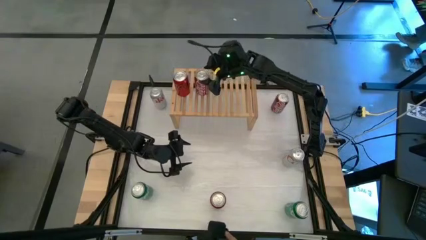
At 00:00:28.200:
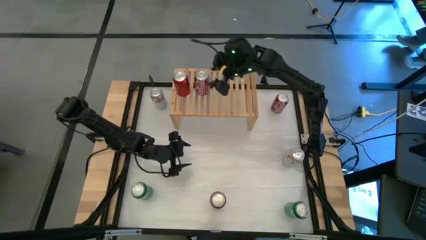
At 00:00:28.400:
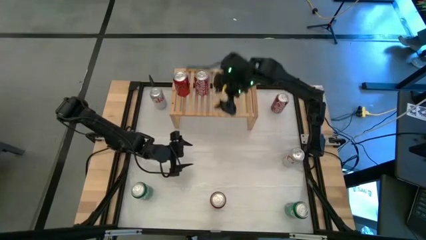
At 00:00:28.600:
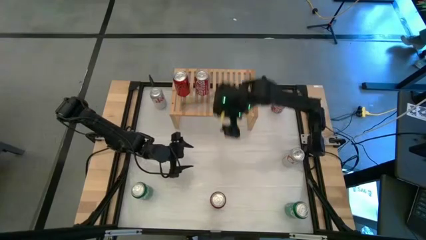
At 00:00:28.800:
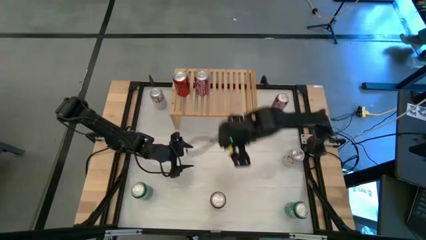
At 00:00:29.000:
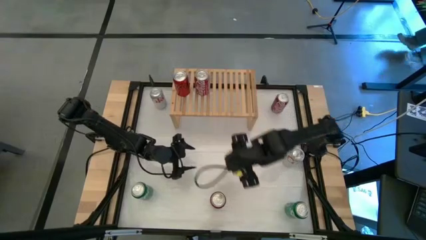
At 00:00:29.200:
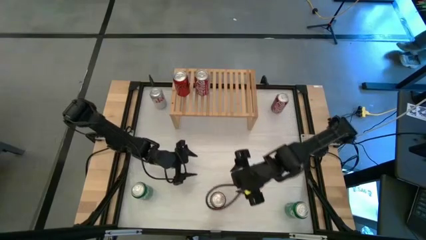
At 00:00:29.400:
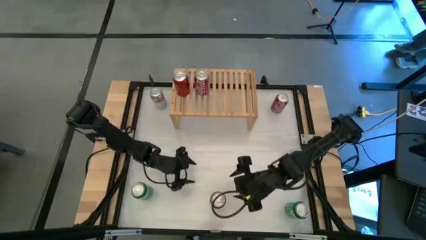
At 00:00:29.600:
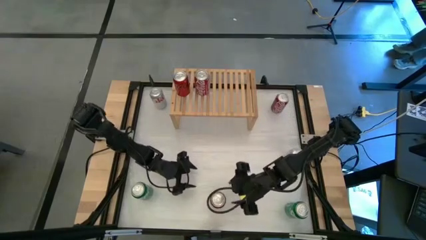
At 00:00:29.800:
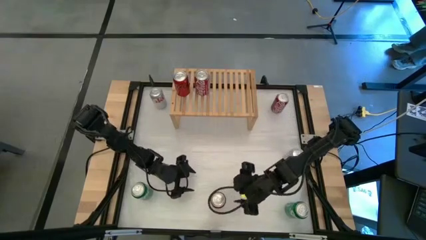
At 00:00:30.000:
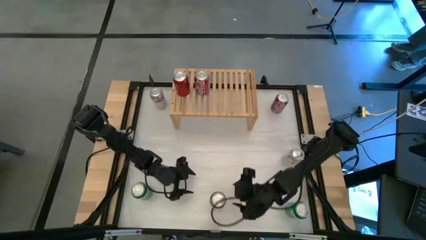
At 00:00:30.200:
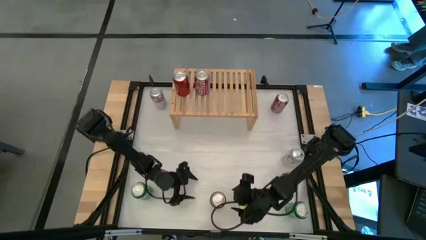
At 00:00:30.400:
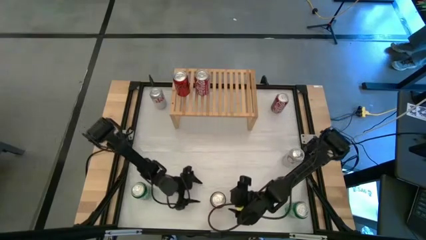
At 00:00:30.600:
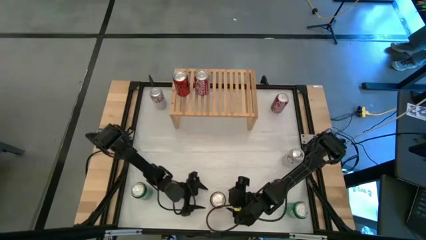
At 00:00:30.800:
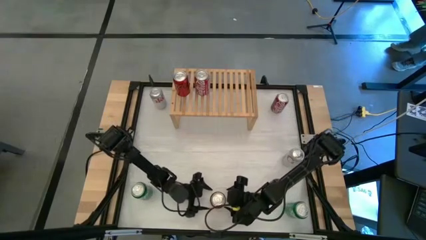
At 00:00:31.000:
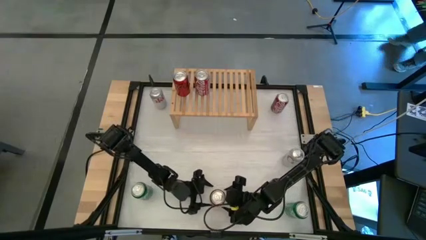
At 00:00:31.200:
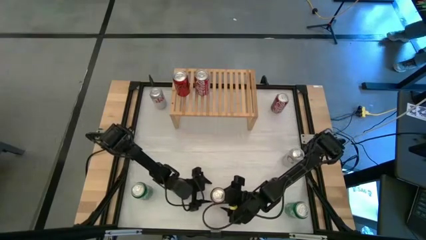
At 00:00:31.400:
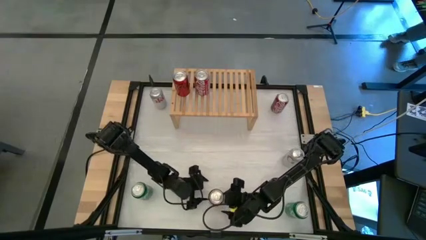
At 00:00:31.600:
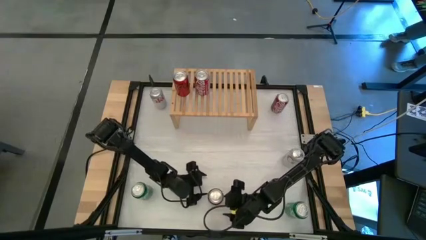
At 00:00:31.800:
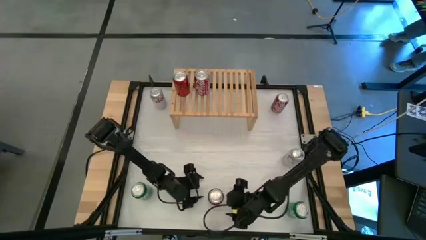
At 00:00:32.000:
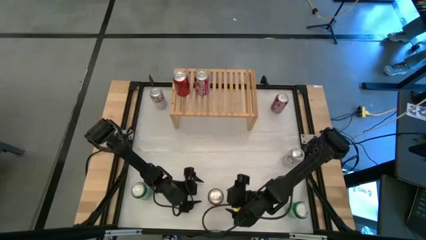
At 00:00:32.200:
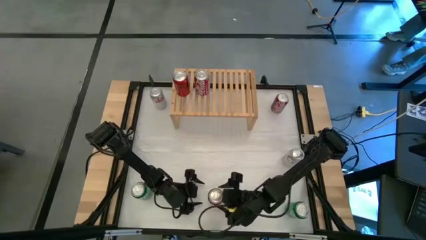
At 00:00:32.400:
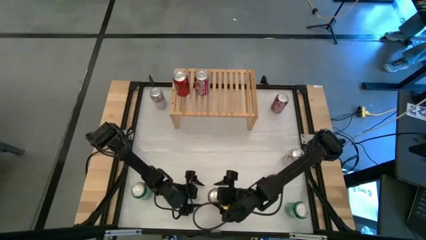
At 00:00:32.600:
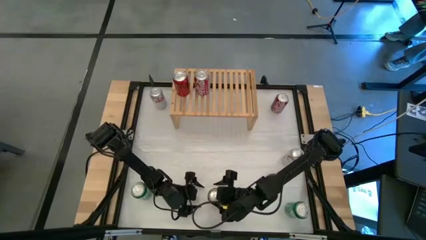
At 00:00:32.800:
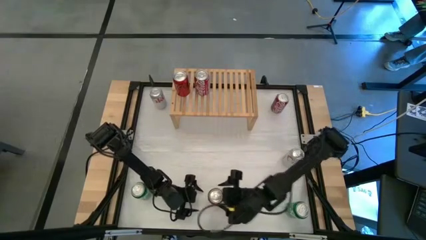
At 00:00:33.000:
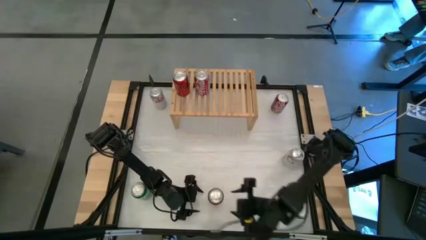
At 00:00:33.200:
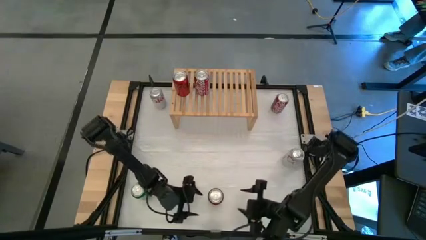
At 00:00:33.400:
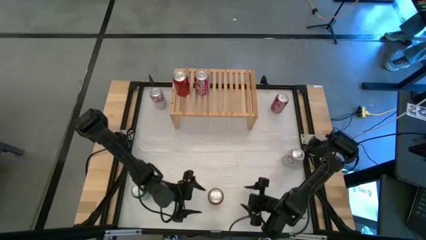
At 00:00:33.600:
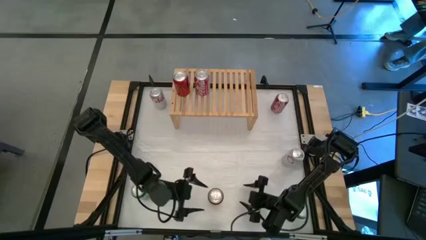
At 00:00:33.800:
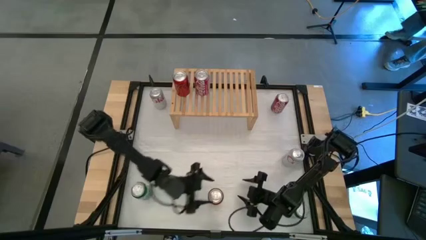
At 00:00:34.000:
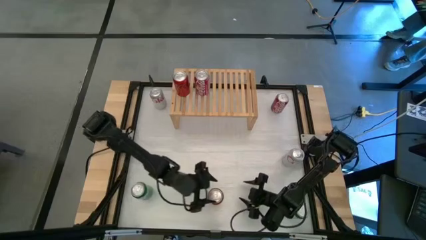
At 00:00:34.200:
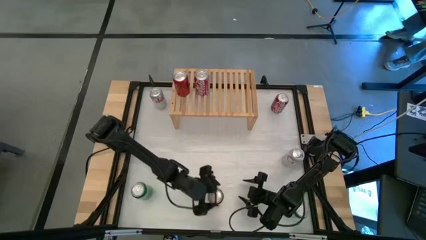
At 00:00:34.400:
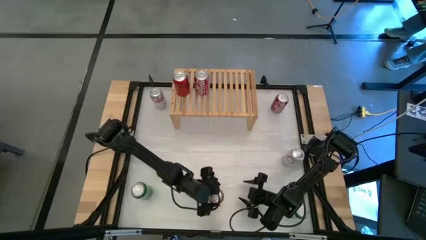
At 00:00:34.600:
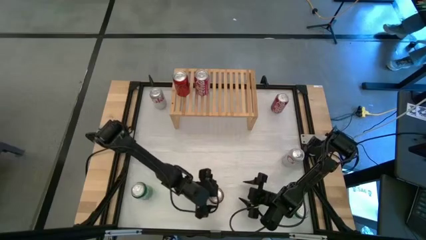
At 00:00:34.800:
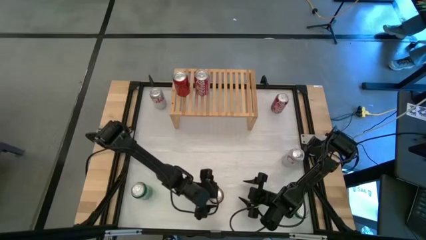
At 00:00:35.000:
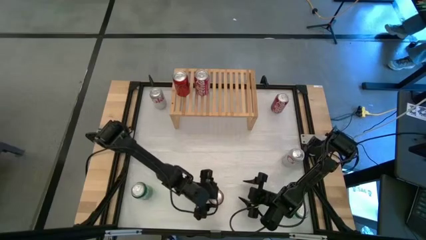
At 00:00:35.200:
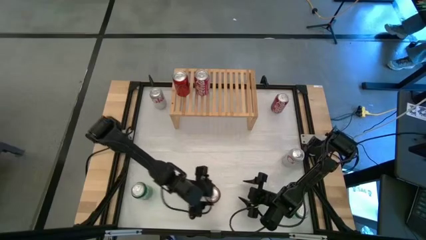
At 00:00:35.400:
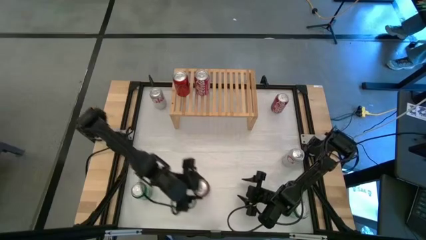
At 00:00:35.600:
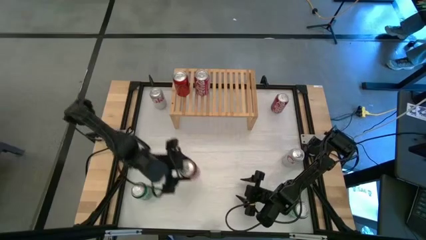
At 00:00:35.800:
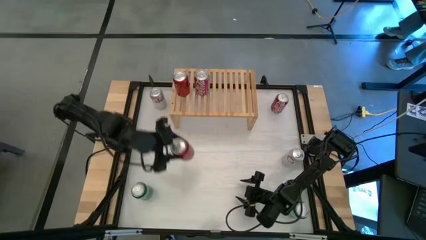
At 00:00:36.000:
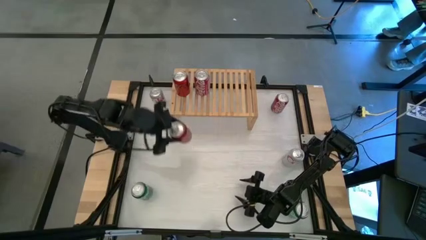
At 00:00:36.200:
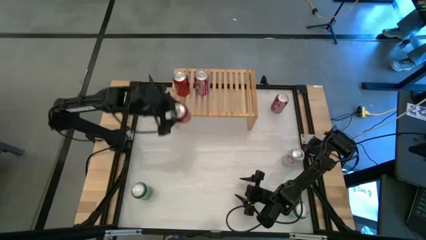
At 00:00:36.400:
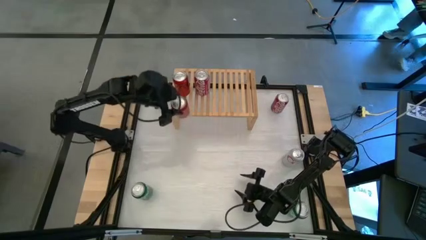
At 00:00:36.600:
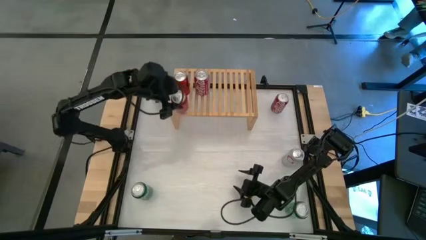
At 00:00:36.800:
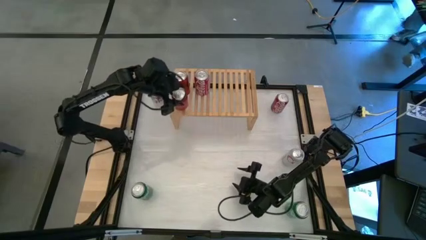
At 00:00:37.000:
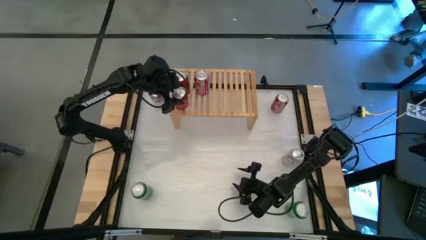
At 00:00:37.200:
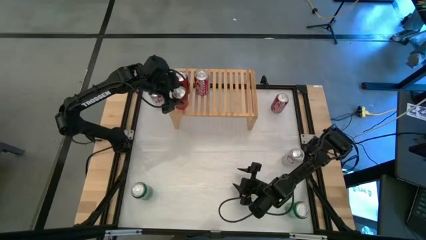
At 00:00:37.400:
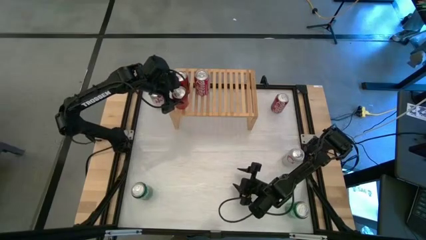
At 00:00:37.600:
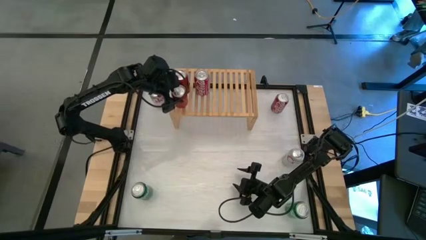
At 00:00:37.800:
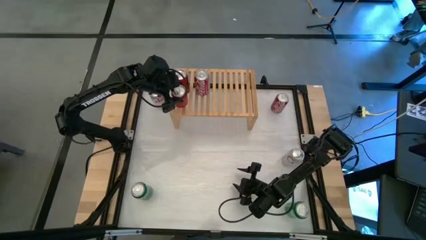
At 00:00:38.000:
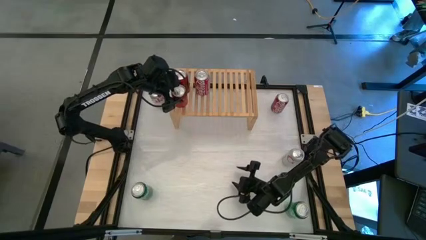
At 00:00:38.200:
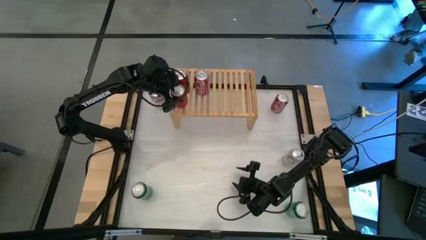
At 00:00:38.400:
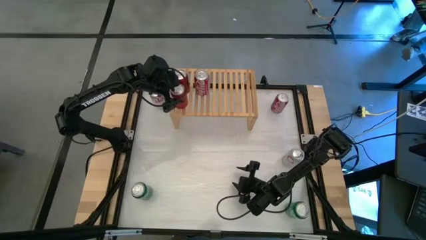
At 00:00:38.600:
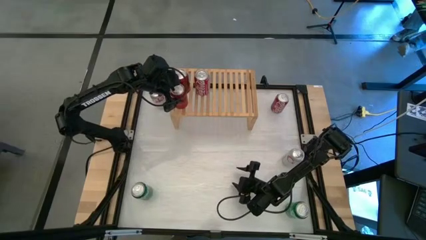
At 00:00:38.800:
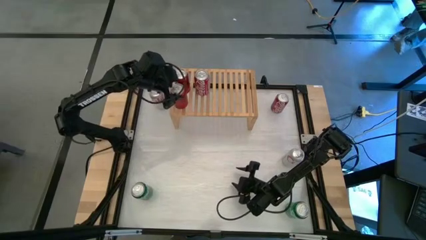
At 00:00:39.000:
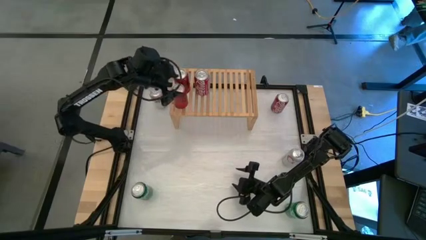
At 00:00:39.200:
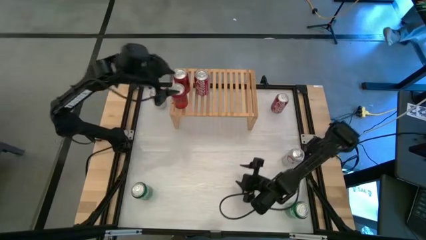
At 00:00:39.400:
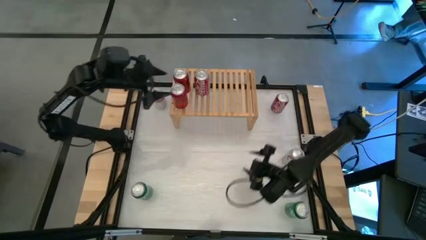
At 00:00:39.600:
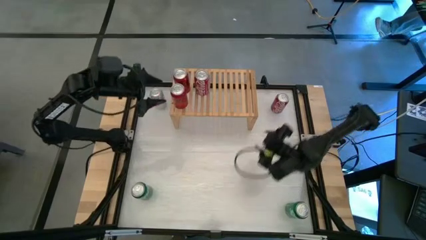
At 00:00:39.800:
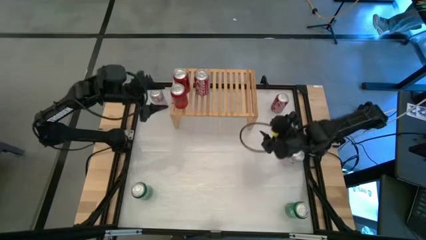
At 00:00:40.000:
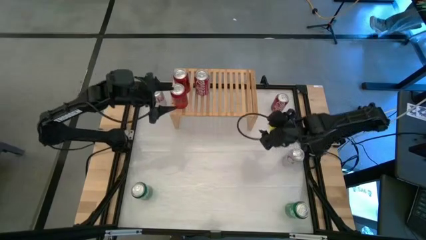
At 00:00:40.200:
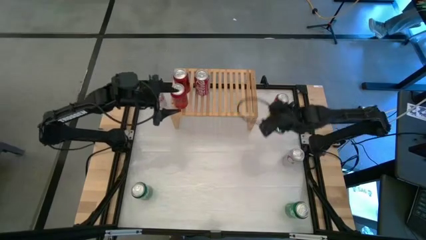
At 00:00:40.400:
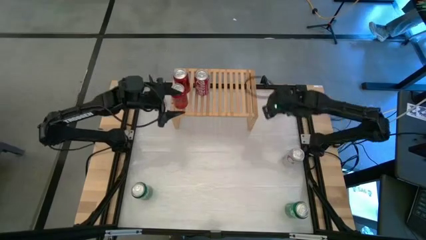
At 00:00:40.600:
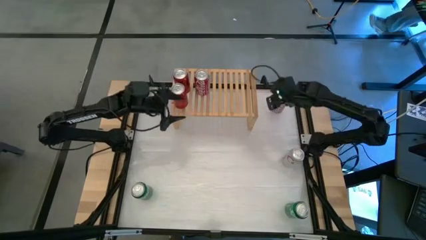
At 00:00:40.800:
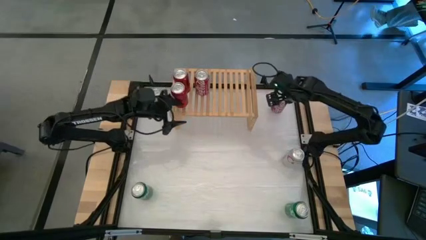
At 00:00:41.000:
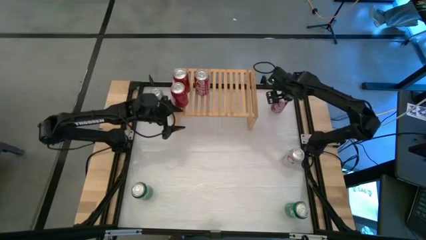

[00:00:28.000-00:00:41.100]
Task: Place canned beverage on shelf
Put the red and black soda can on the shelf aligned with the other red and black soda can
